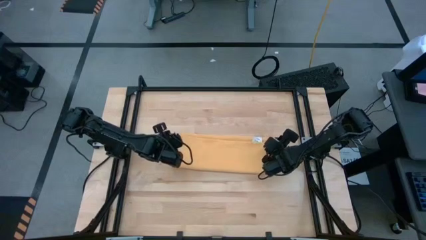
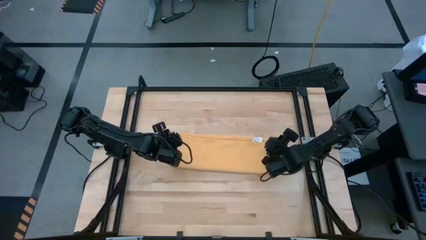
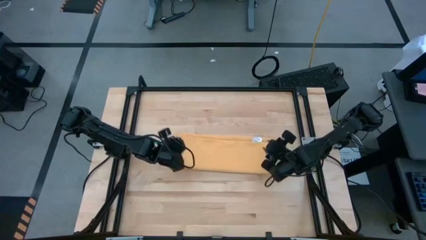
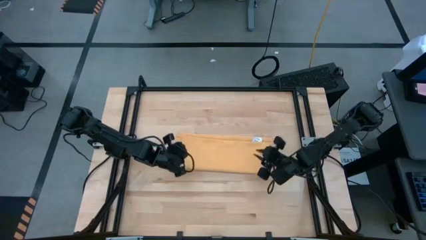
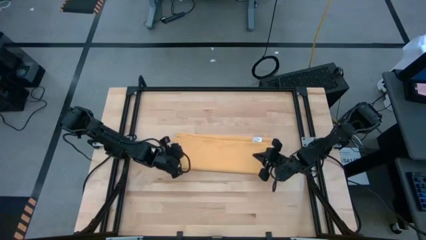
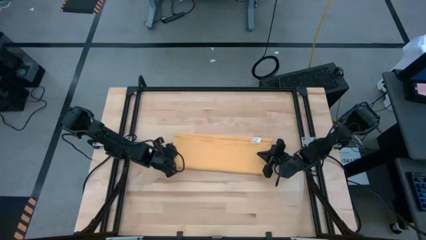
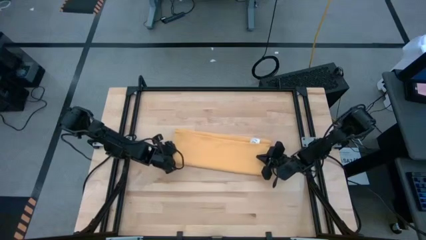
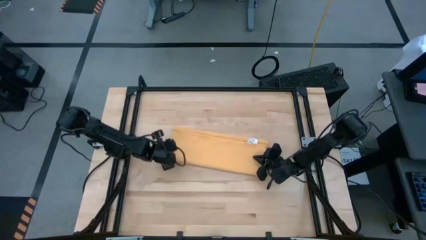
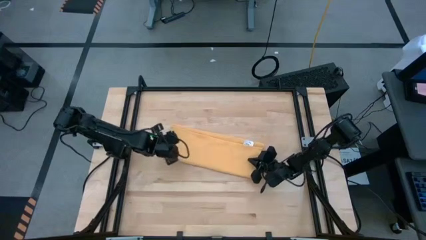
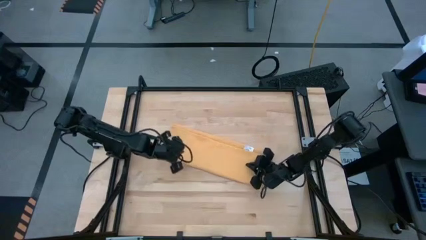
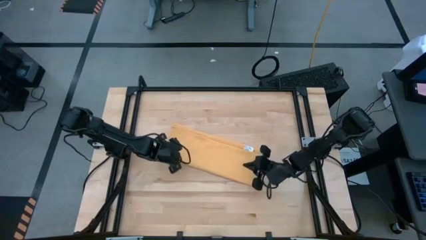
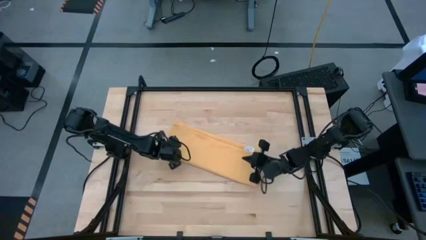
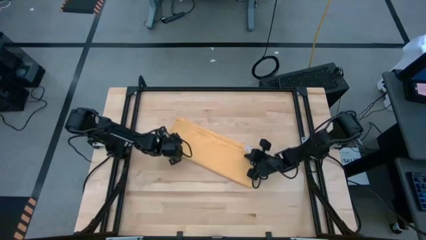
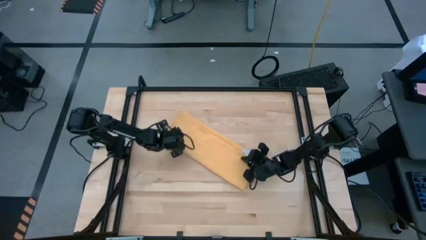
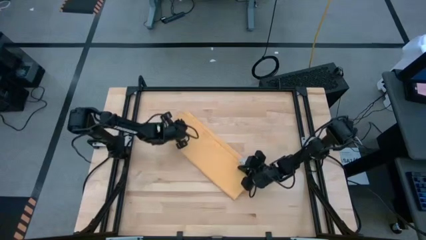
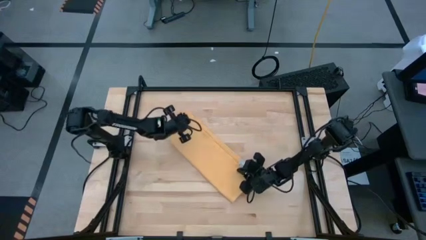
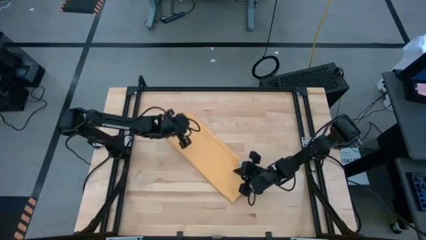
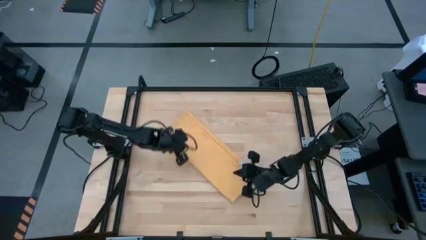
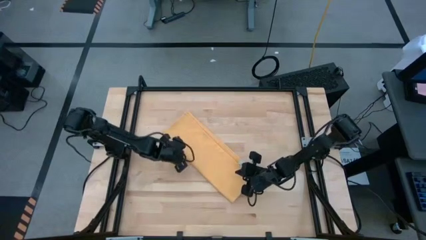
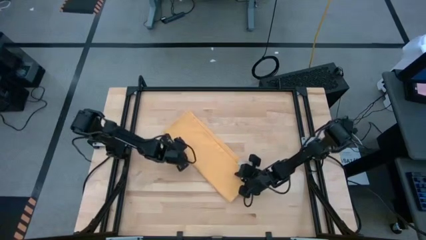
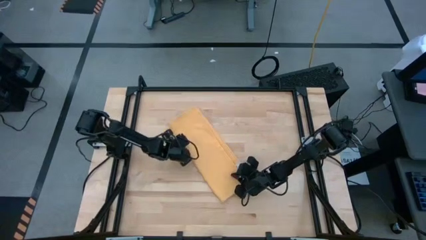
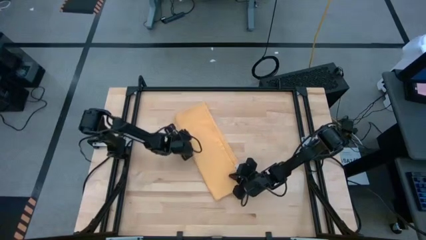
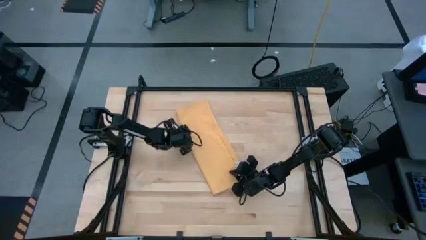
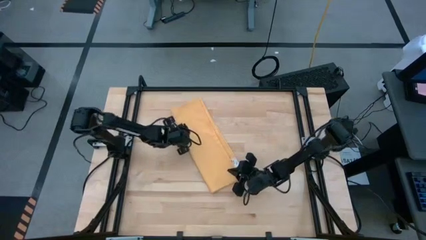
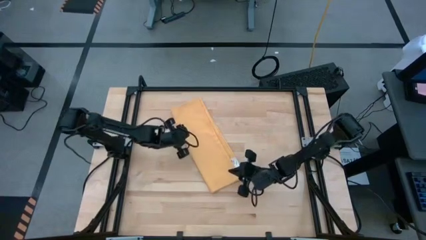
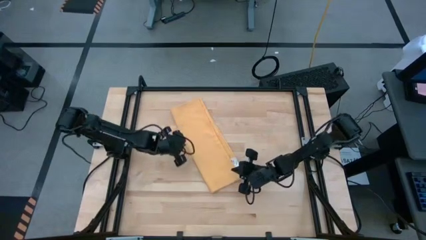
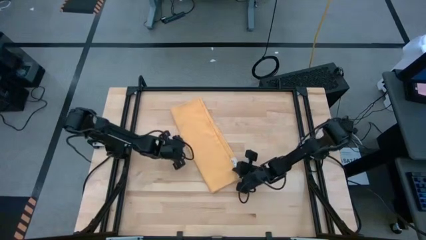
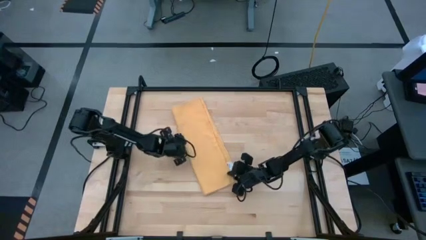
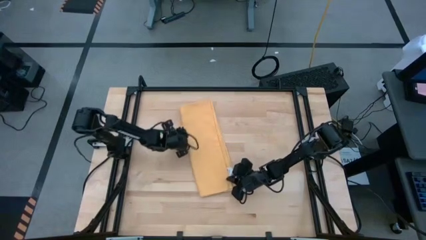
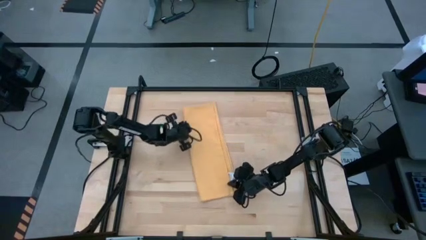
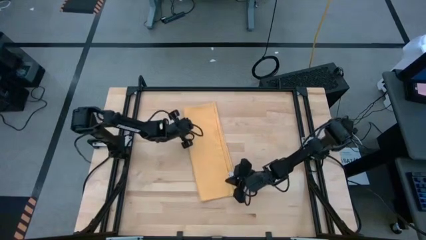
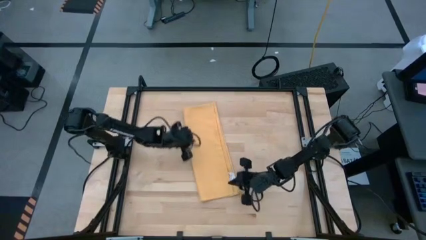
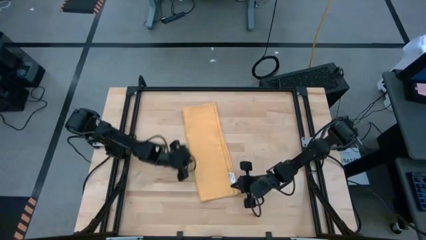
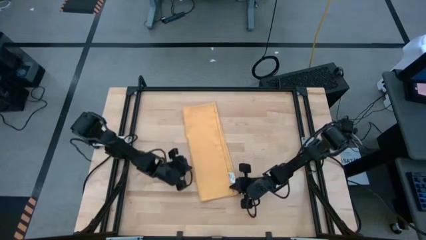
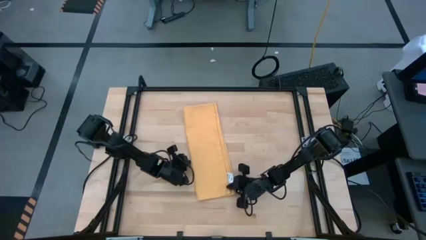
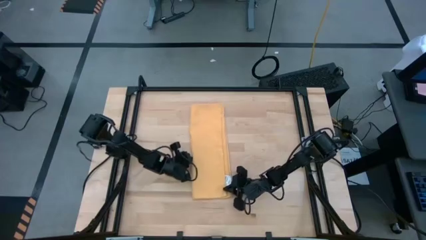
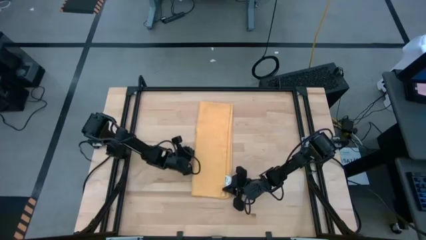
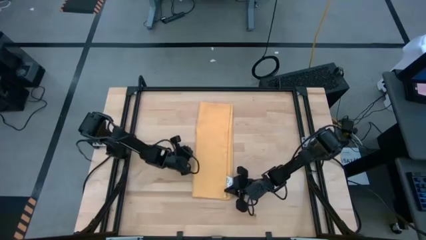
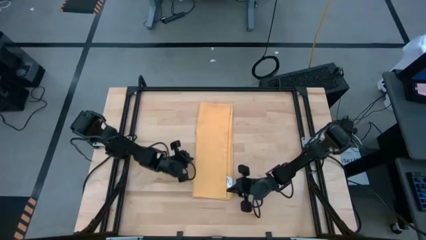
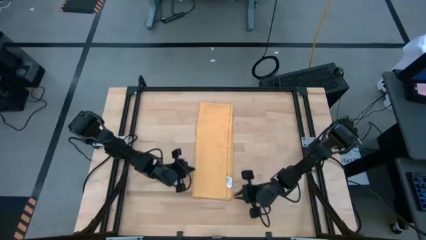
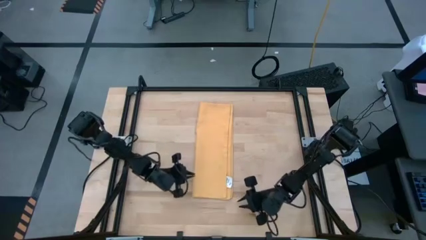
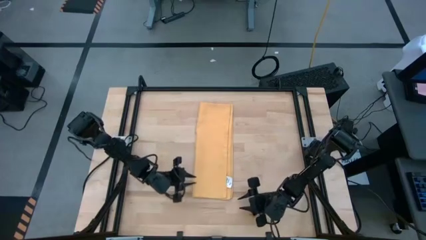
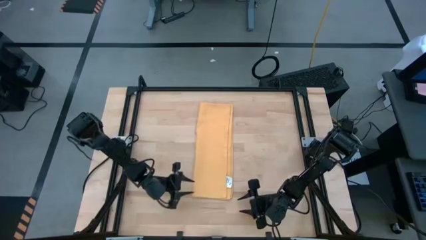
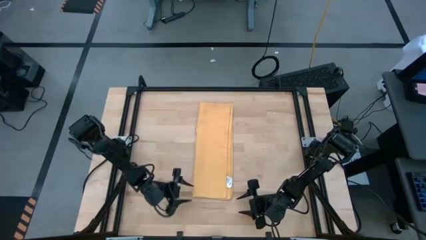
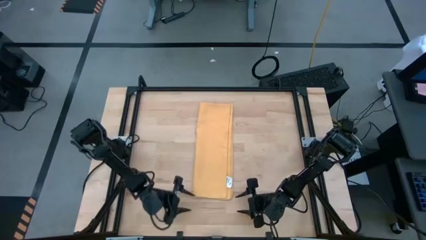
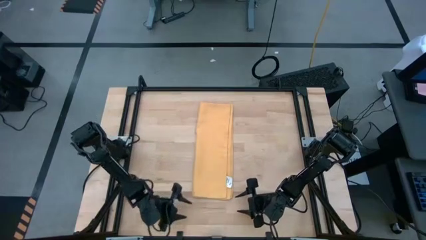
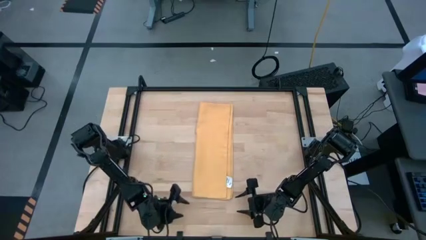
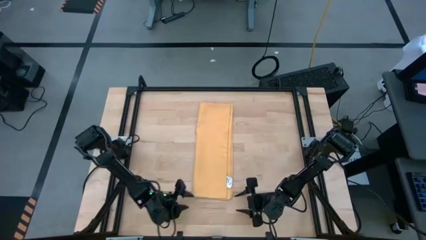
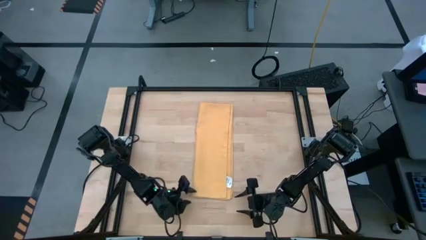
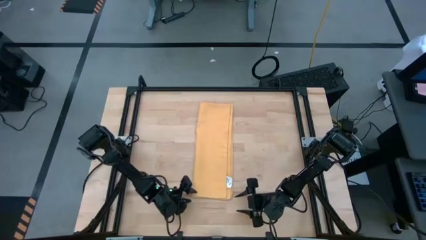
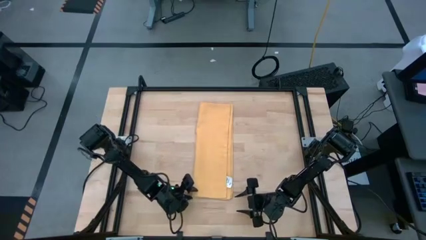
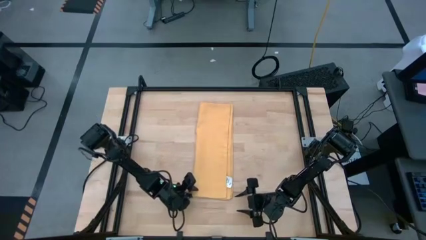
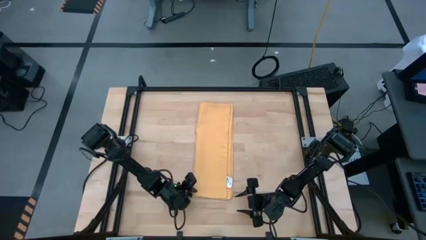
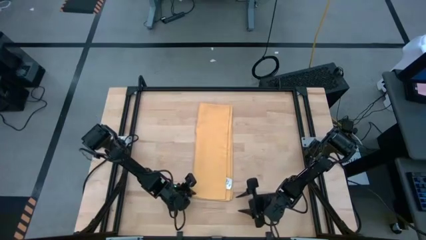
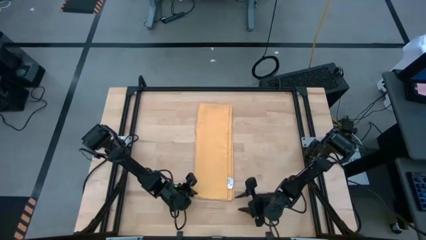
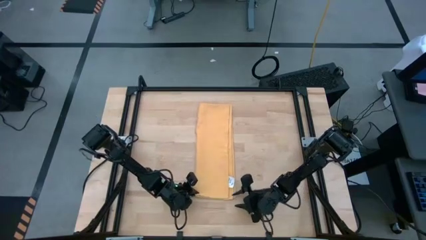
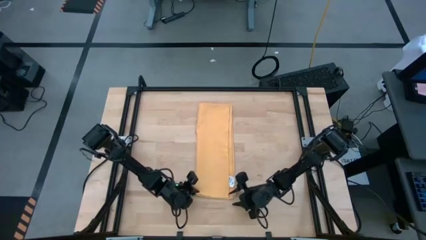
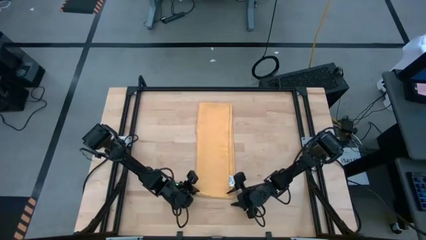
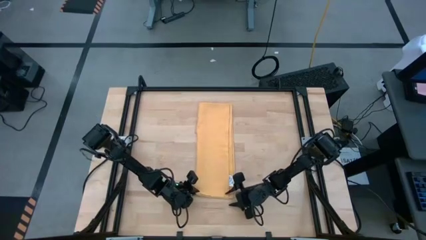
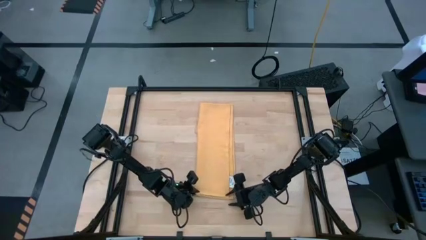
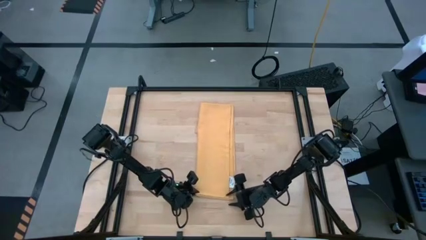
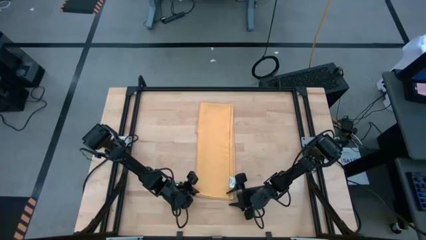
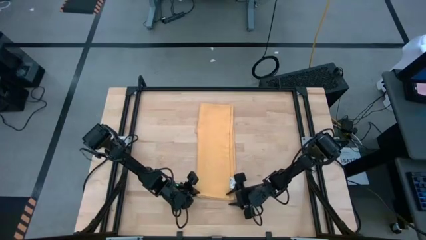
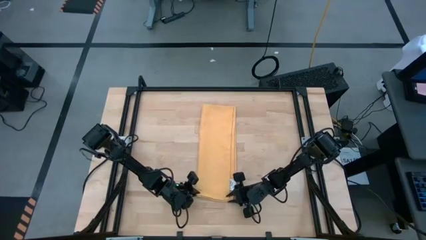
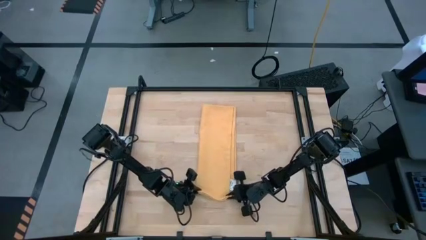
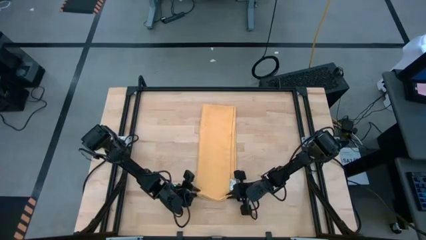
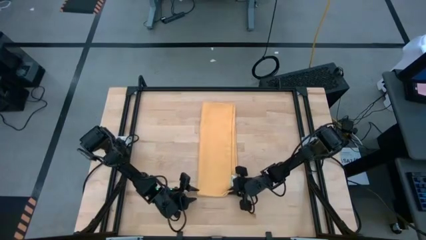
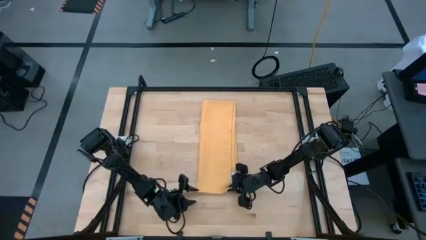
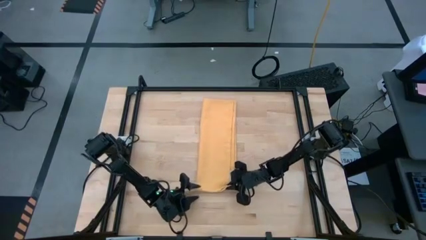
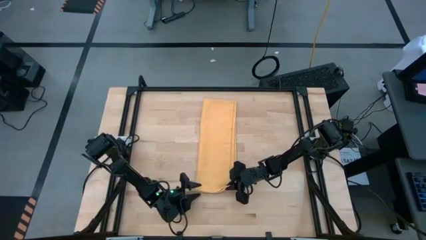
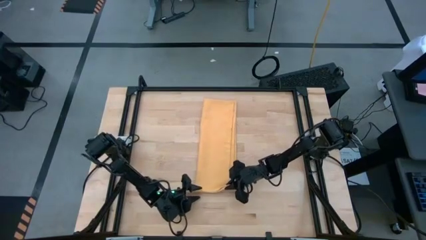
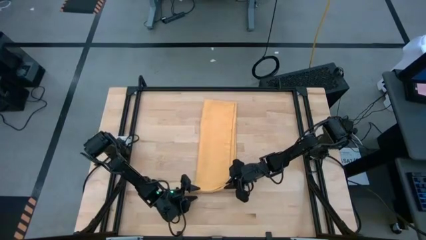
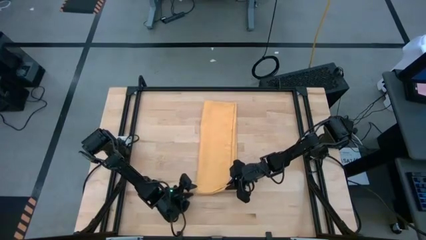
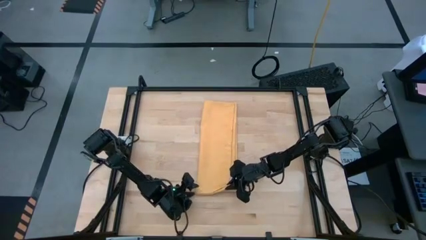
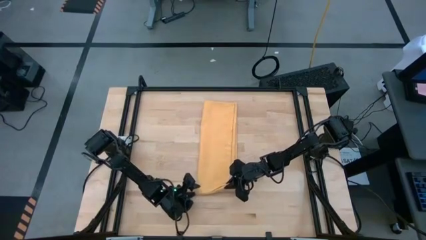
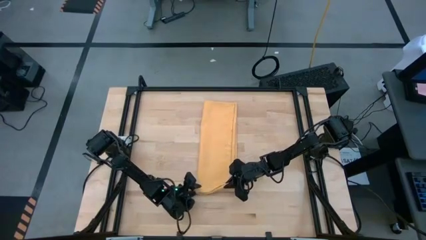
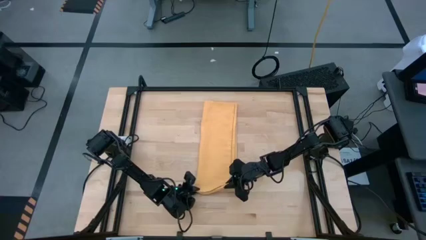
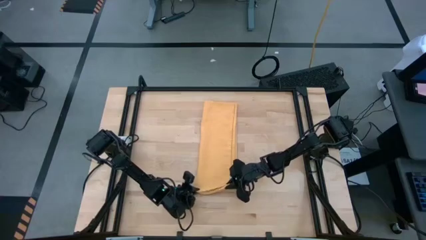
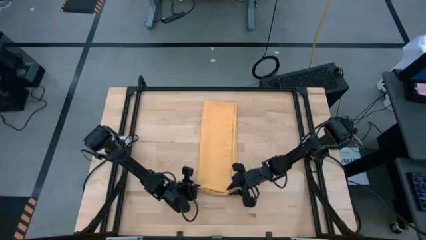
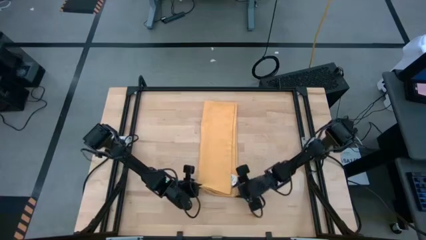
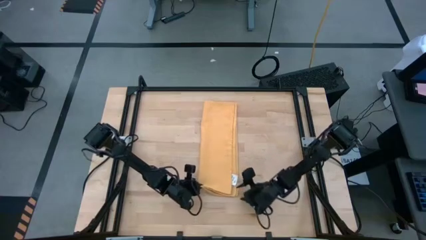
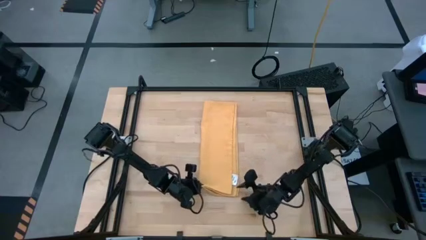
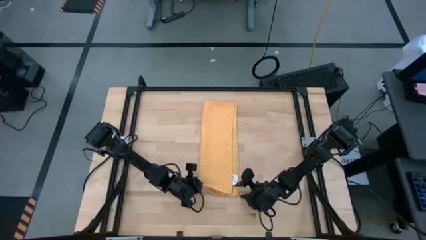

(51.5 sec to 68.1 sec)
Task: Roll towel
Roll the yellow towel
